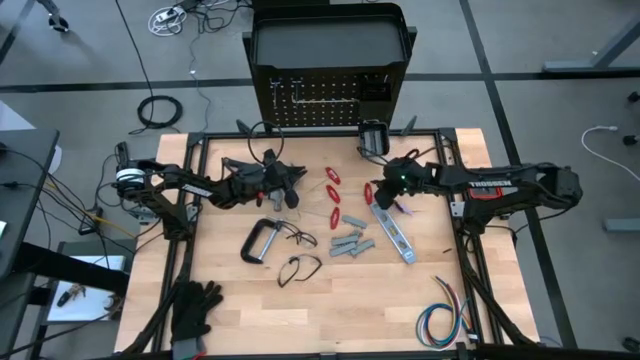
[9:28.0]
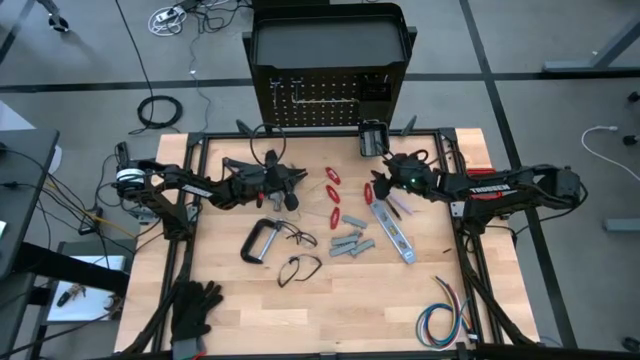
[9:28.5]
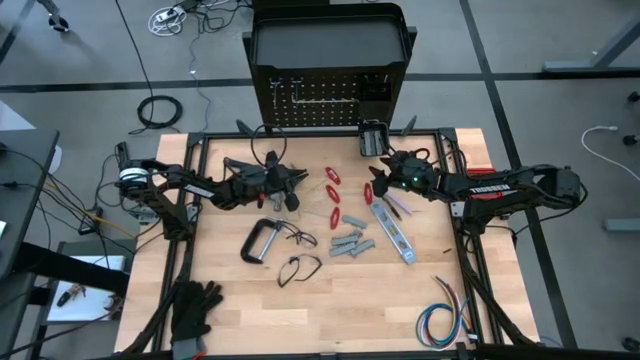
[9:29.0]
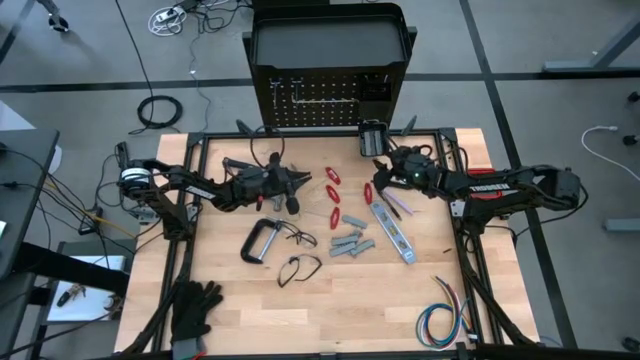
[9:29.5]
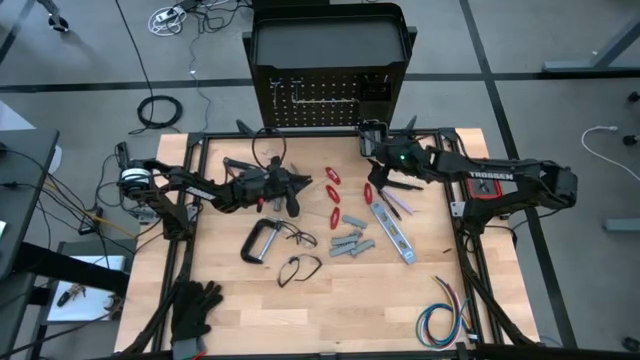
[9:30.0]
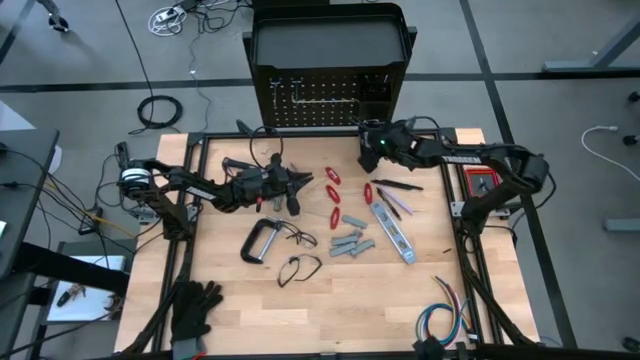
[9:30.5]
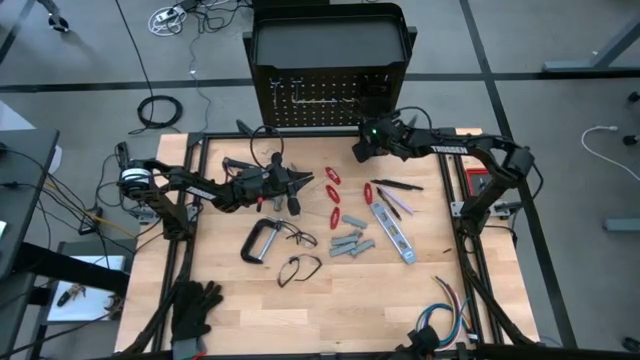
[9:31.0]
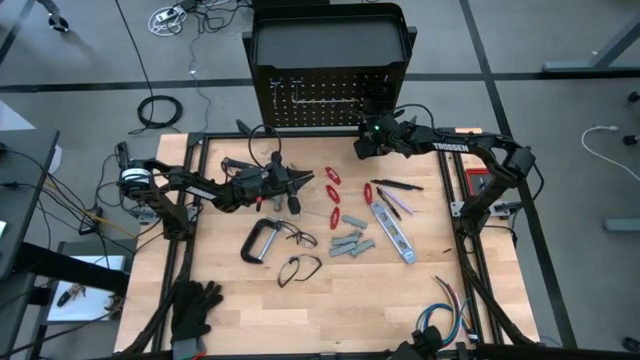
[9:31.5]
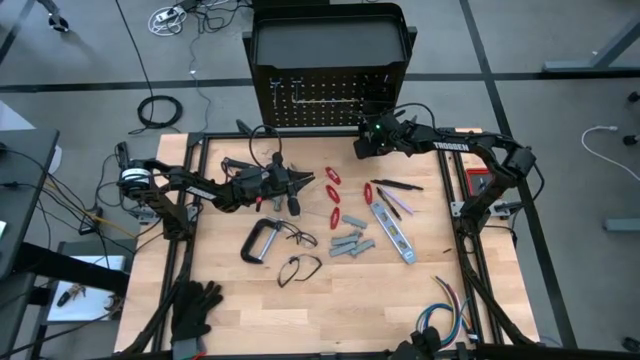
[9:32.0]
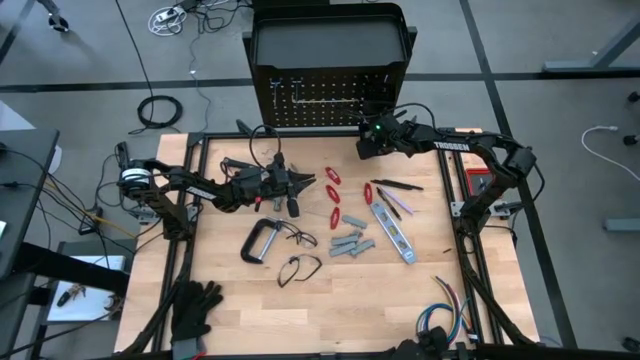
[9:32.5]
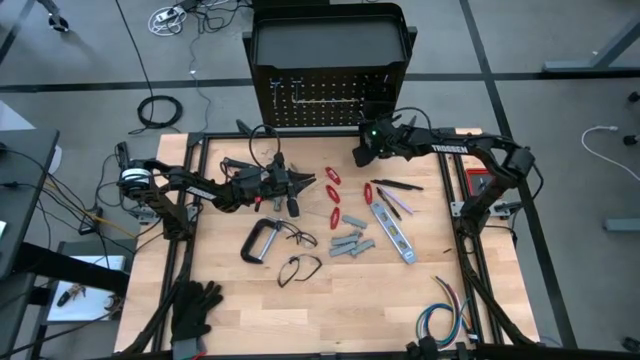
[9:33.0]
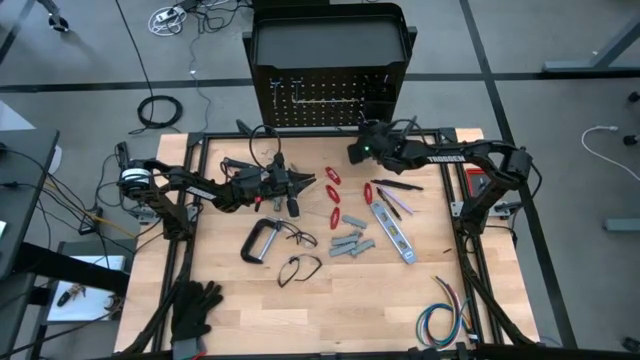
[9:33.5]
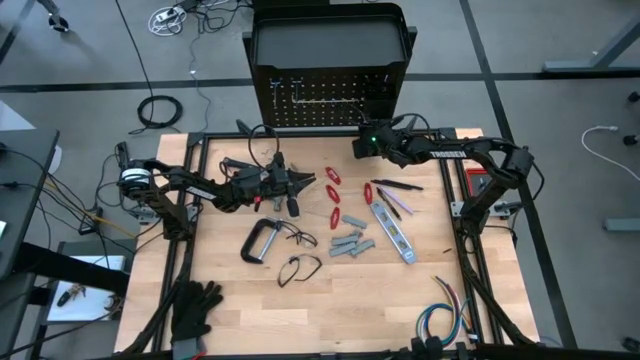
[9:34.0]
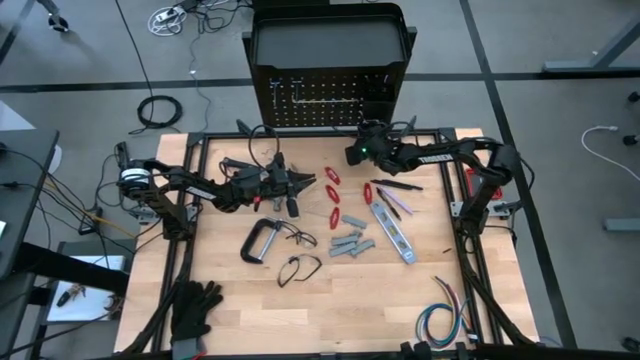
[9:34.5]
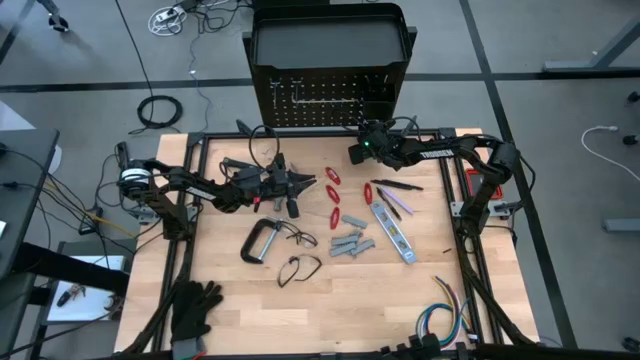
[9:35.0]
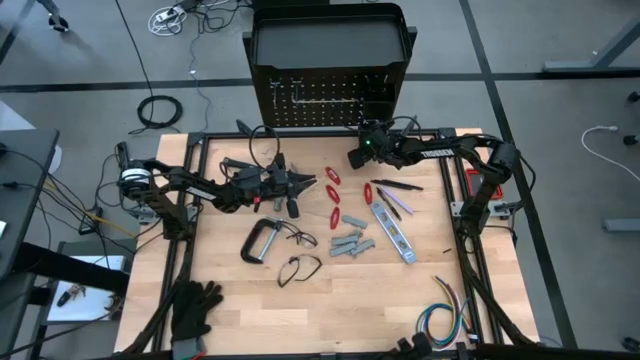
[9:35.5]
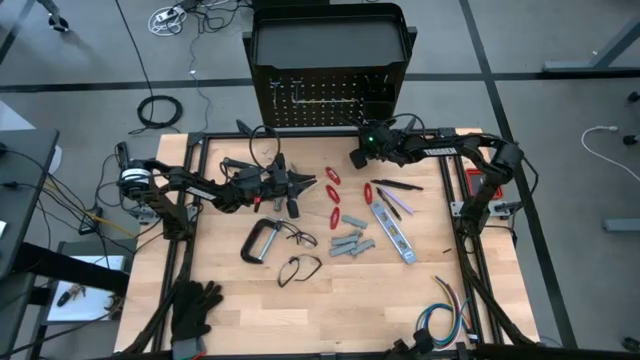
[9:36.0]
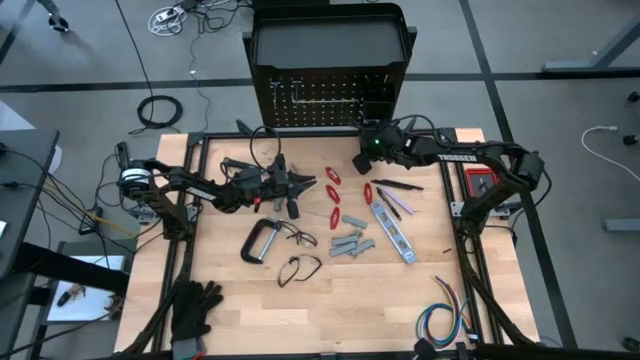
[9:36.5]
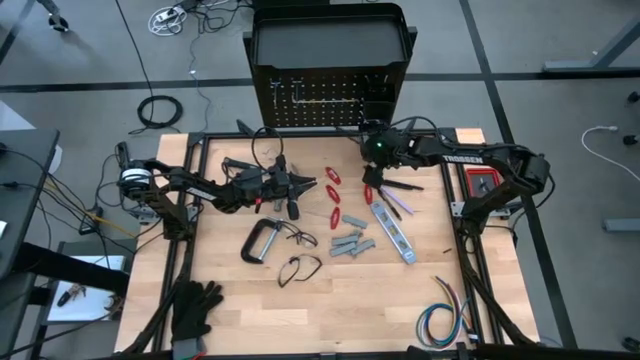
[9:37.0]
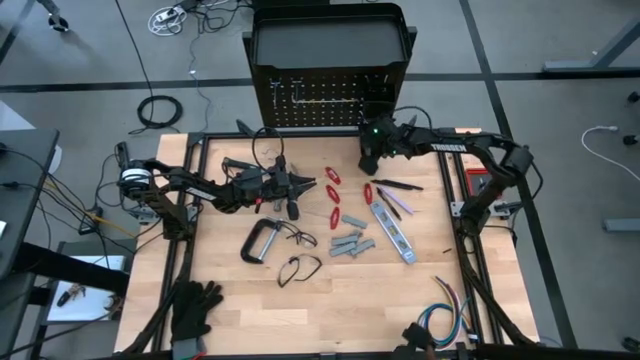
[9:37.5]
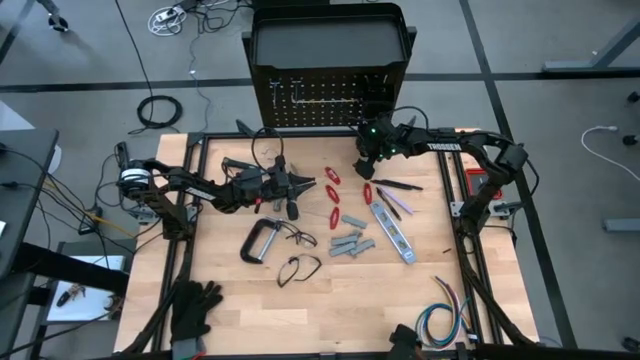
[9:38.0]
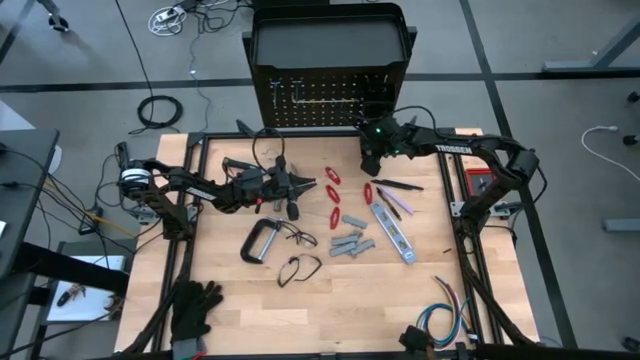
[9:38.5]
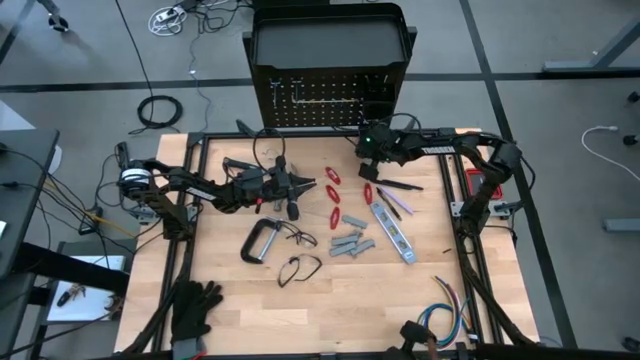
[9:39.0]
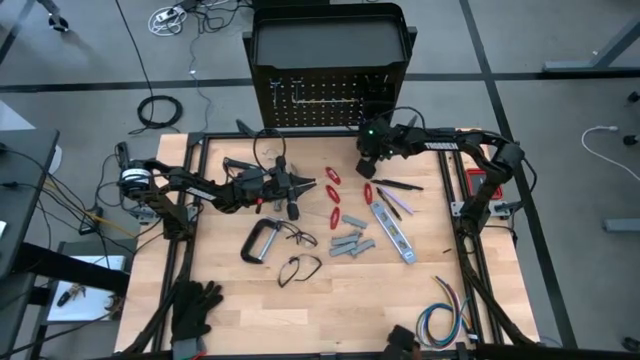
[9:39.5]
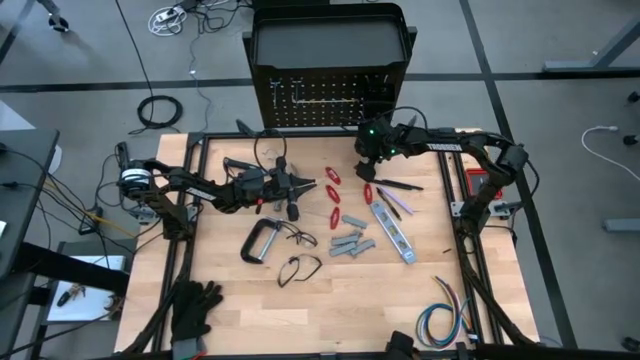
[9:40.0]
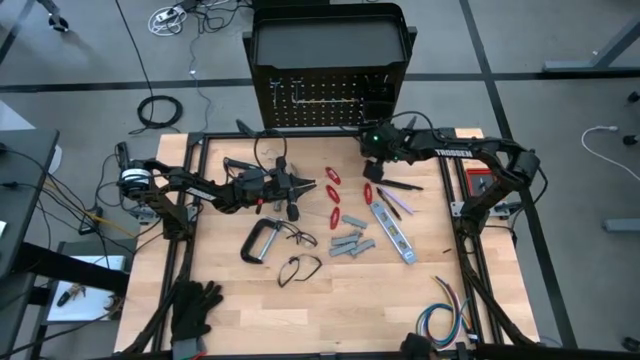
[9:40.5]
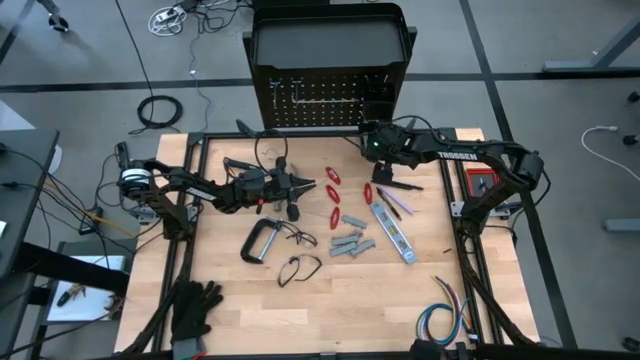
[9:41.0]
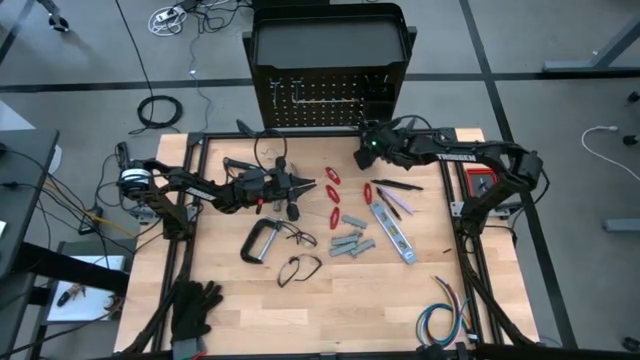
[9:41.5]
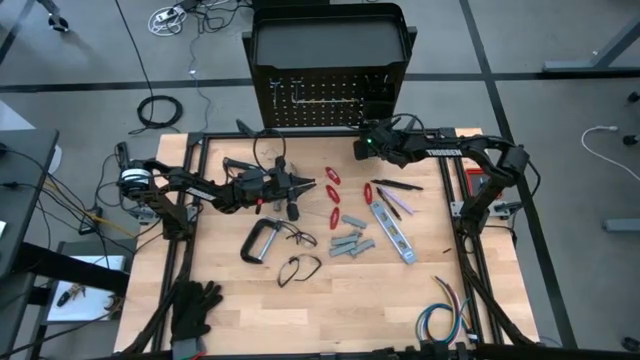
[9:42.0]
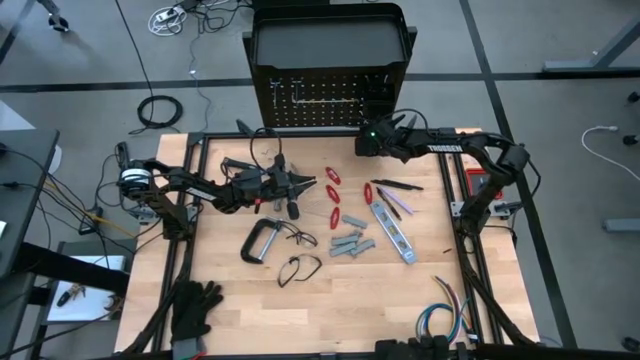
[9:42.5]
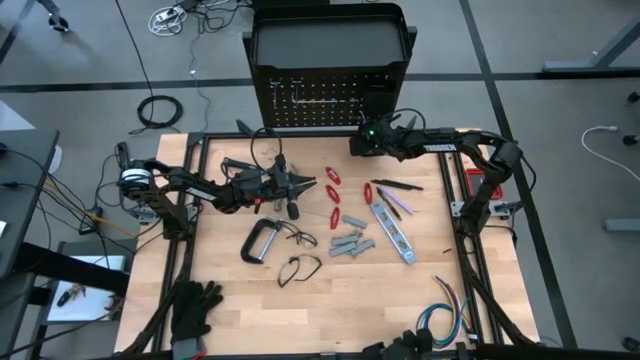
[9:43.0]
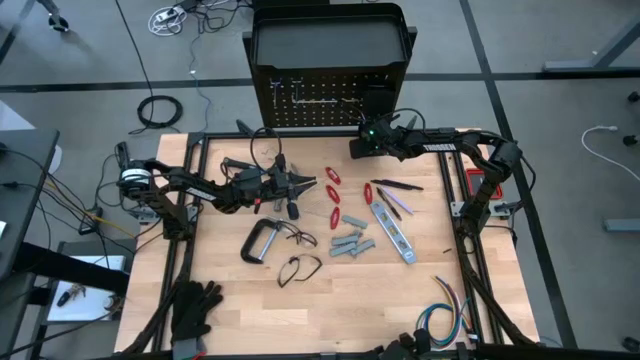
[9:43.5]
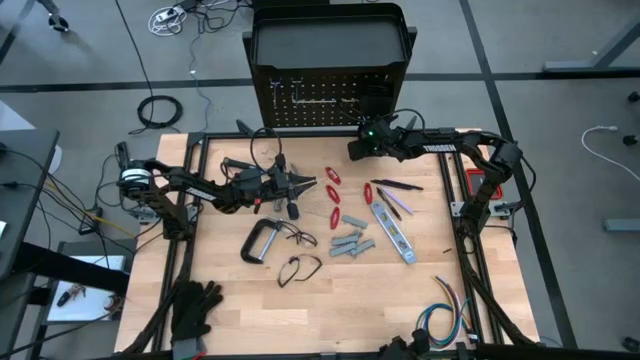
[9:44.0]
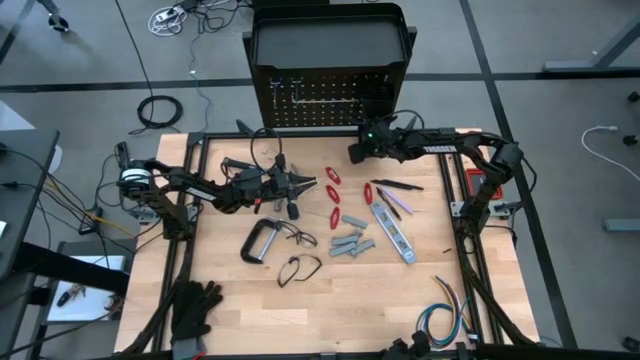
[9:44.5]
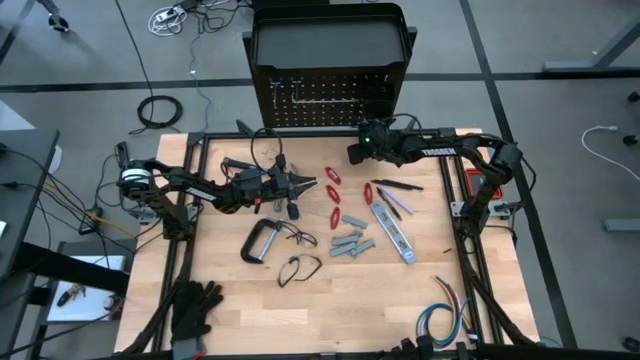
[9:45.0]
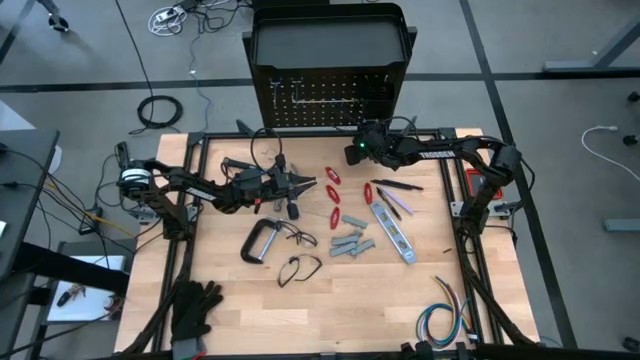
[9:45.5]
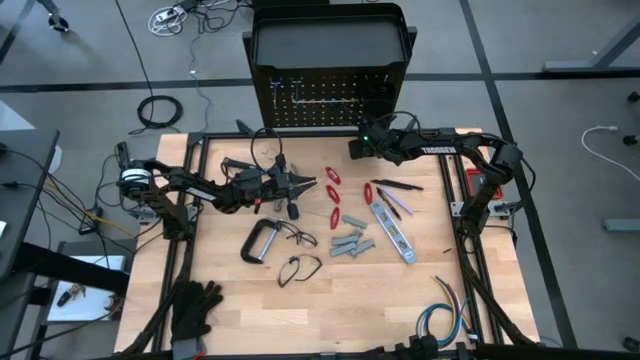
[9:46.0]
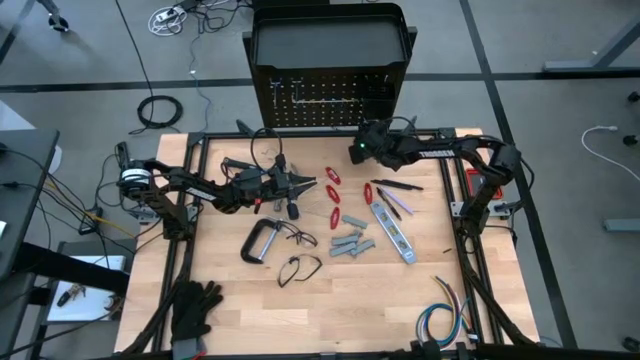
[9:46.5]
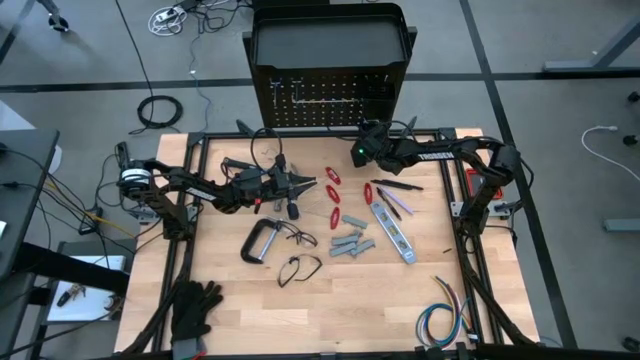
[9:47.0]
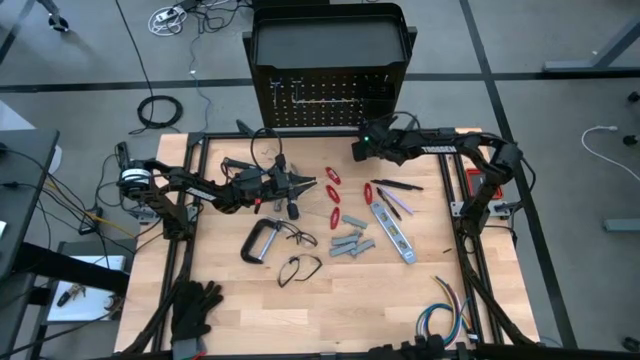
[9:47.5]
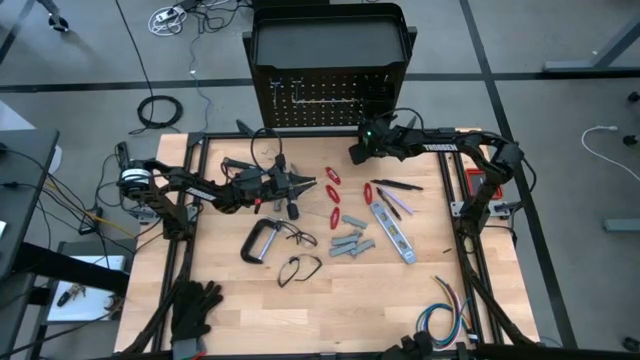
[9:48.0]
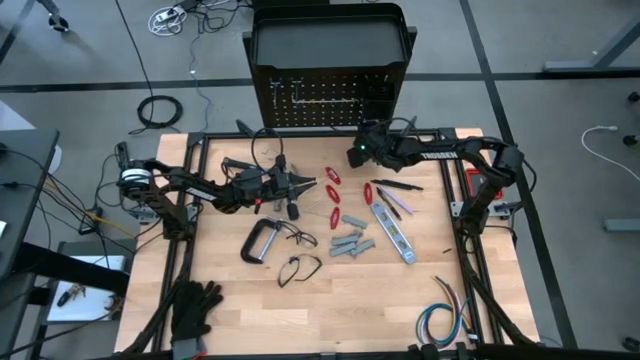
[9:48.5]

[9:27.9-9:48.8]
Task: Hang tools onto peg board
Put the screwdriver bits on the table

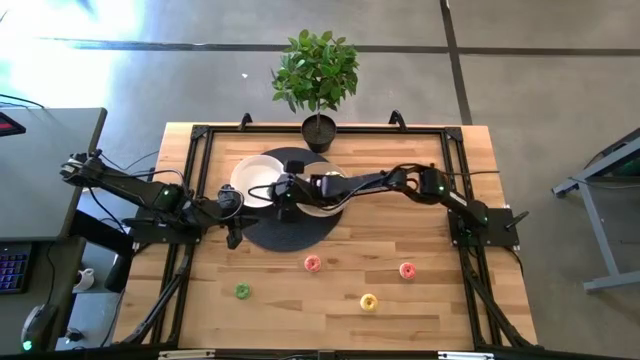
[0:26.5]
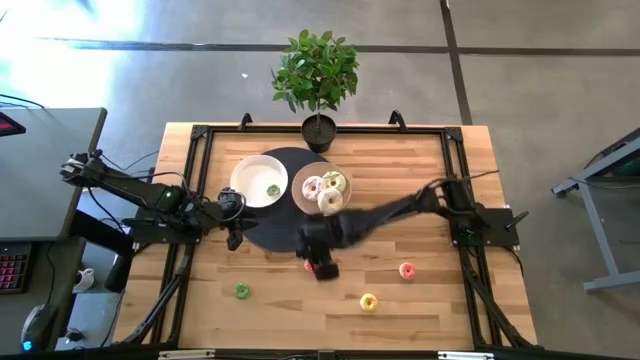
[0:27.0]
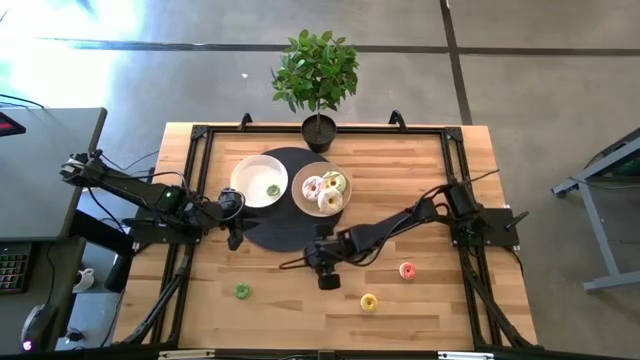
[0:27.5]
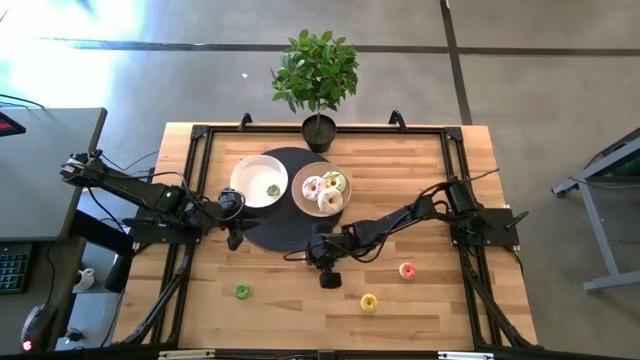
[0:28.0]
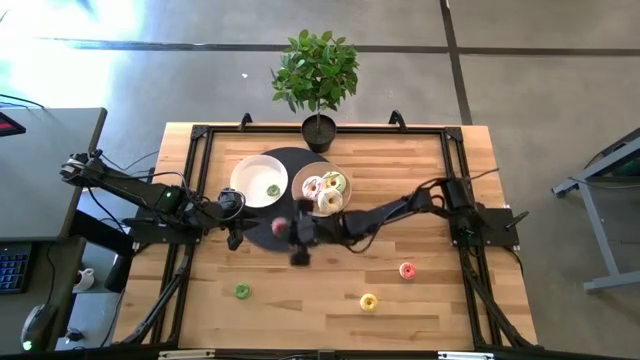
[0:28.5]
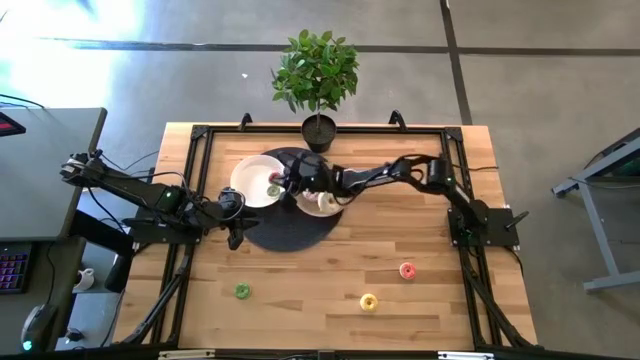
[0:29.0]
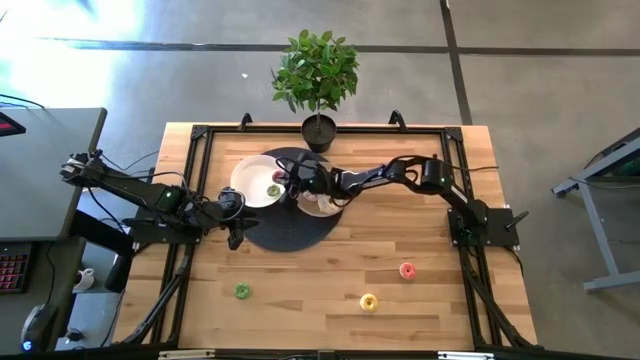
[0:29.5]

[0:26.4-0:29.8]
Task: Pick & Place donuts
Put the left small pink donut onto the white plate
